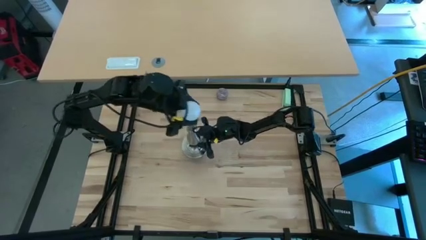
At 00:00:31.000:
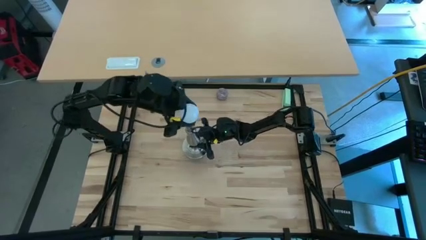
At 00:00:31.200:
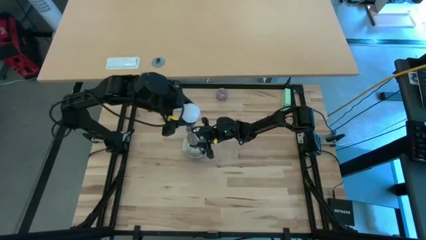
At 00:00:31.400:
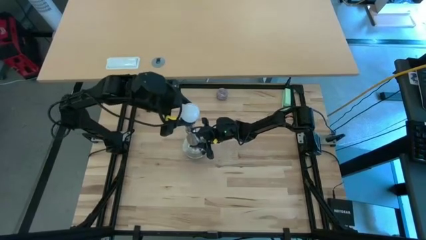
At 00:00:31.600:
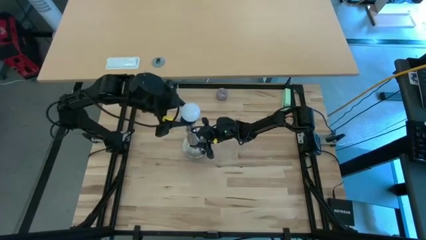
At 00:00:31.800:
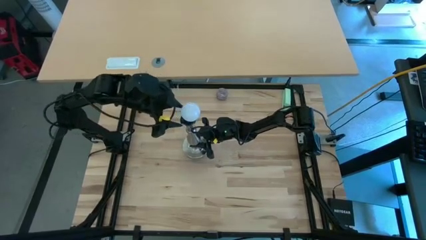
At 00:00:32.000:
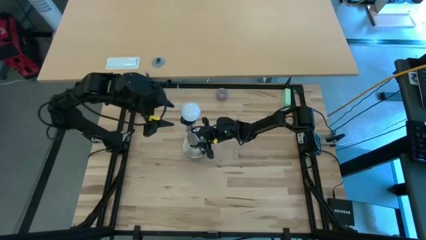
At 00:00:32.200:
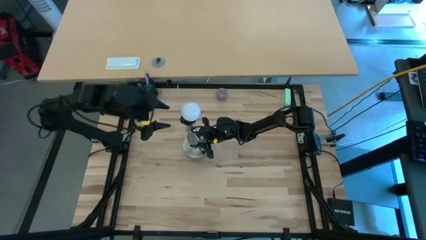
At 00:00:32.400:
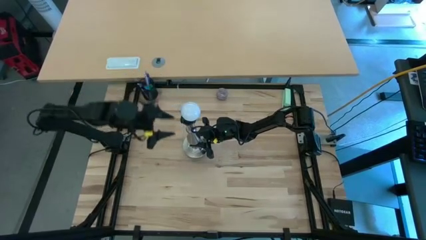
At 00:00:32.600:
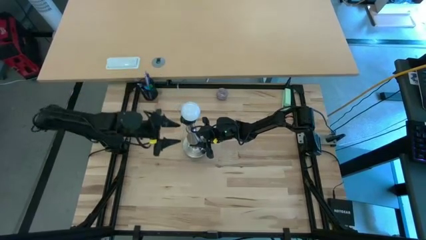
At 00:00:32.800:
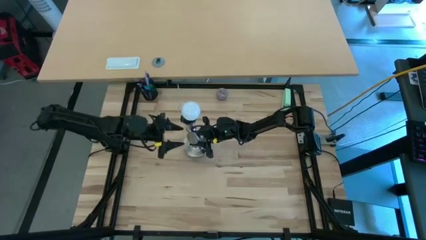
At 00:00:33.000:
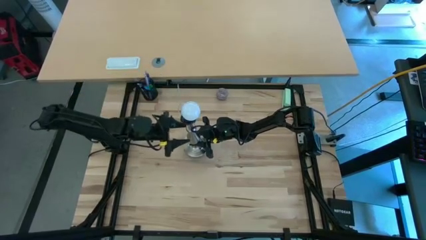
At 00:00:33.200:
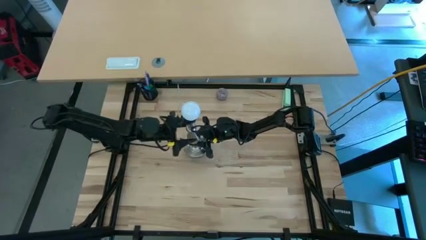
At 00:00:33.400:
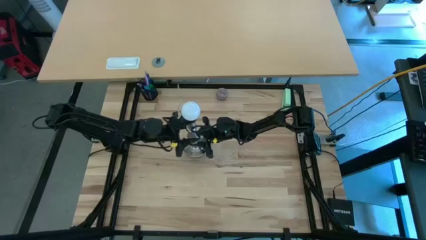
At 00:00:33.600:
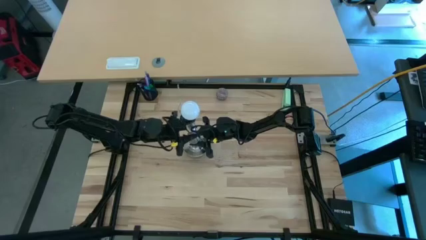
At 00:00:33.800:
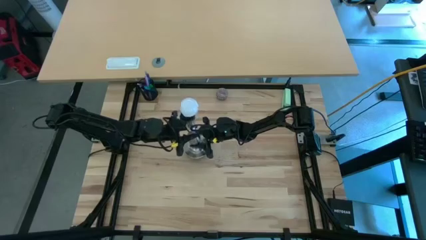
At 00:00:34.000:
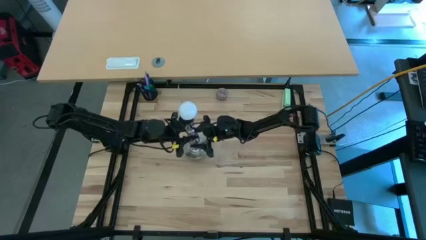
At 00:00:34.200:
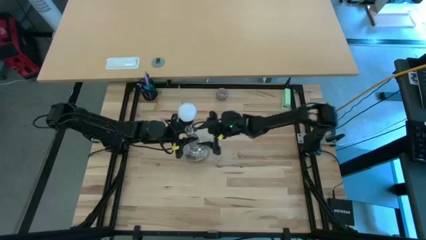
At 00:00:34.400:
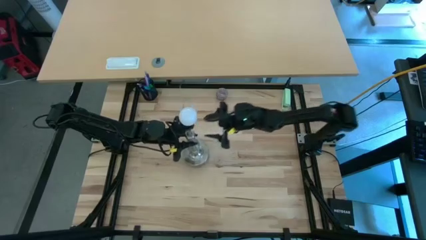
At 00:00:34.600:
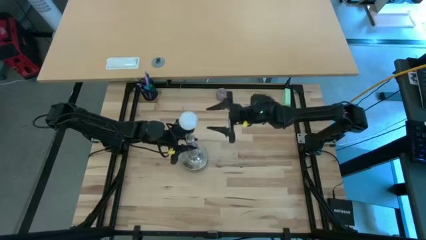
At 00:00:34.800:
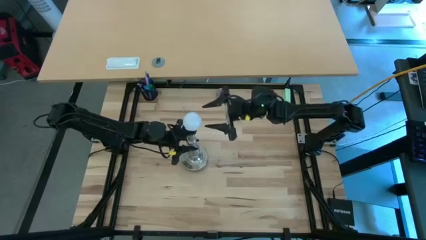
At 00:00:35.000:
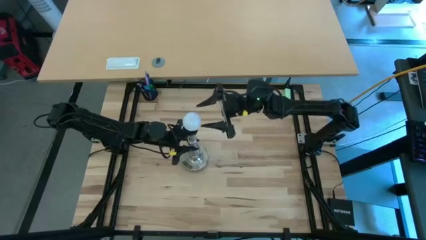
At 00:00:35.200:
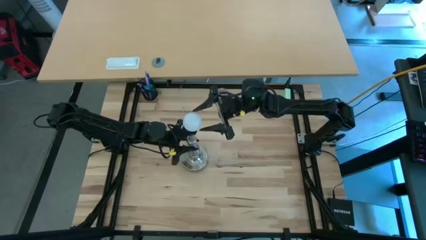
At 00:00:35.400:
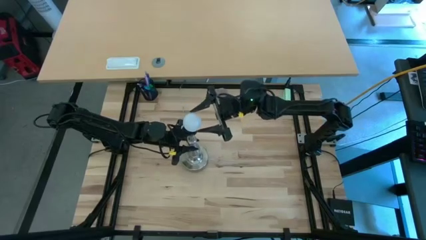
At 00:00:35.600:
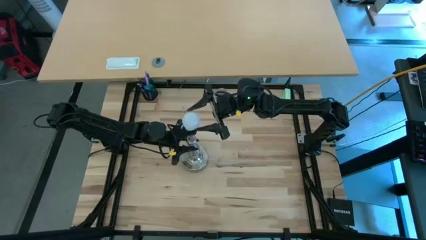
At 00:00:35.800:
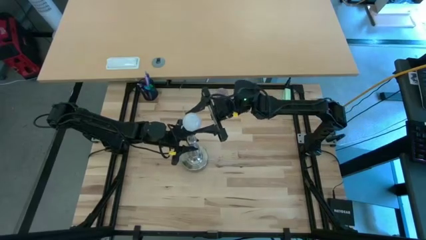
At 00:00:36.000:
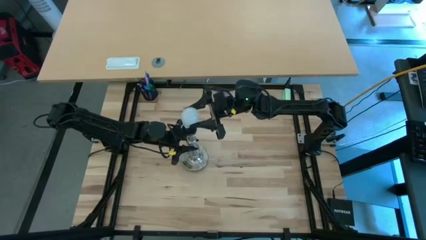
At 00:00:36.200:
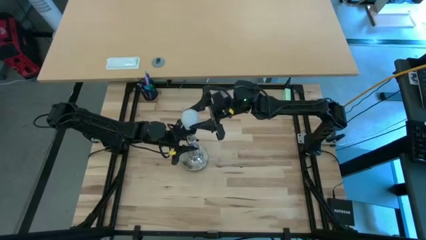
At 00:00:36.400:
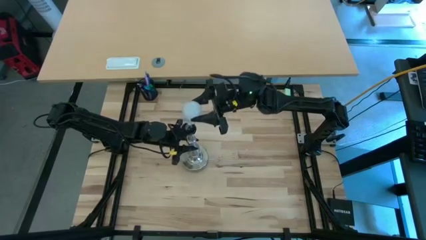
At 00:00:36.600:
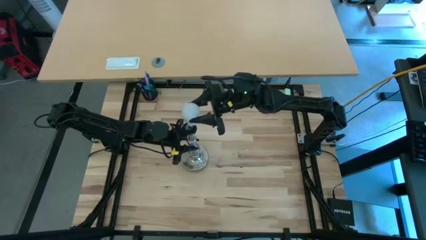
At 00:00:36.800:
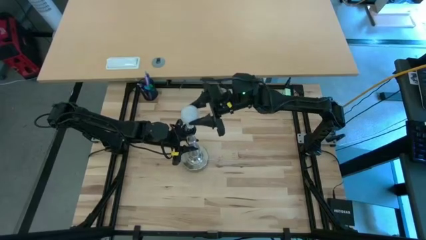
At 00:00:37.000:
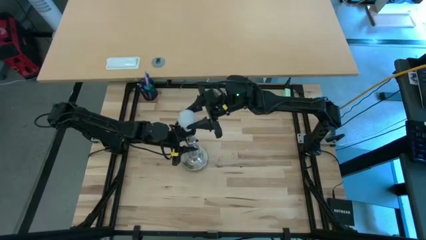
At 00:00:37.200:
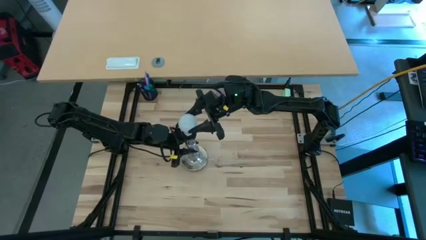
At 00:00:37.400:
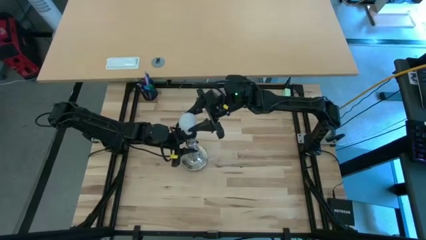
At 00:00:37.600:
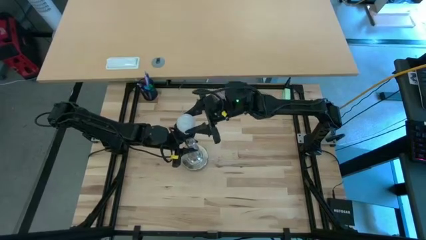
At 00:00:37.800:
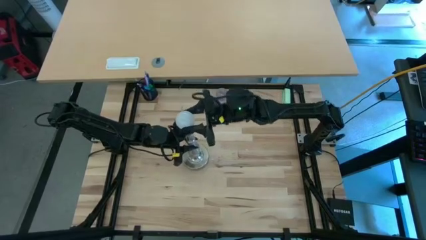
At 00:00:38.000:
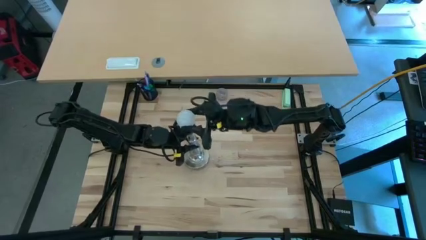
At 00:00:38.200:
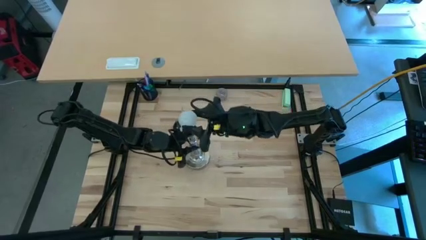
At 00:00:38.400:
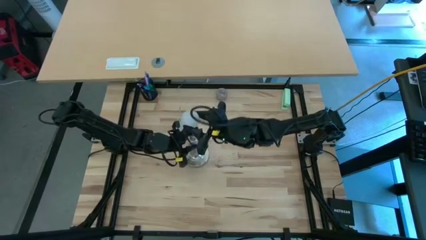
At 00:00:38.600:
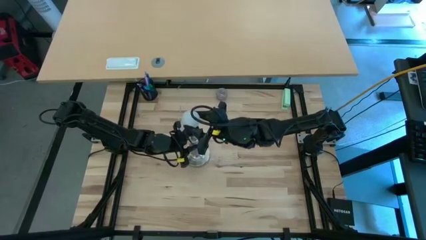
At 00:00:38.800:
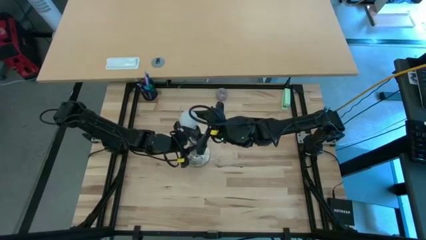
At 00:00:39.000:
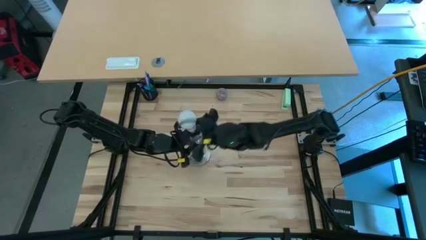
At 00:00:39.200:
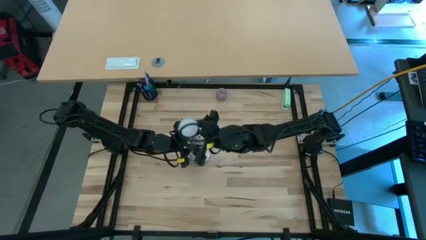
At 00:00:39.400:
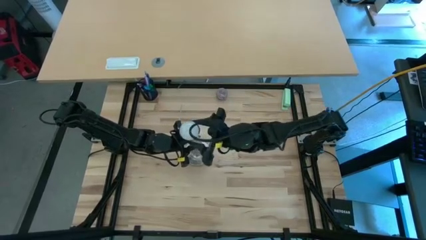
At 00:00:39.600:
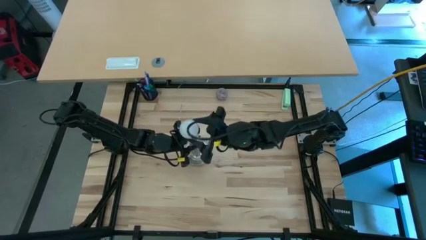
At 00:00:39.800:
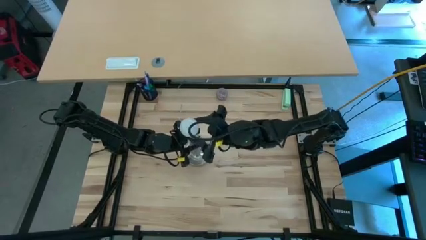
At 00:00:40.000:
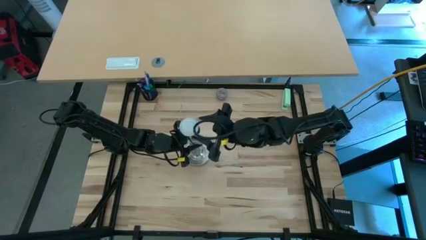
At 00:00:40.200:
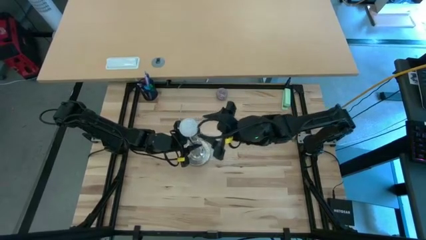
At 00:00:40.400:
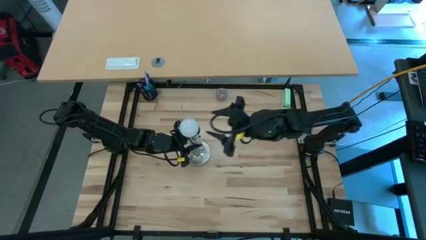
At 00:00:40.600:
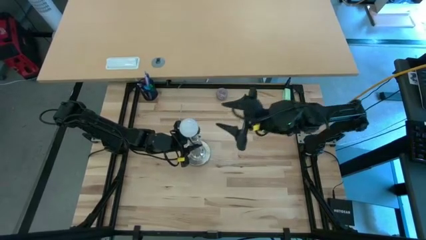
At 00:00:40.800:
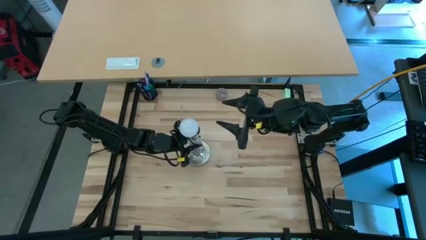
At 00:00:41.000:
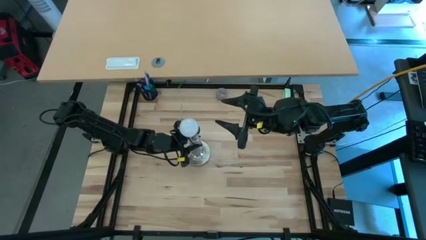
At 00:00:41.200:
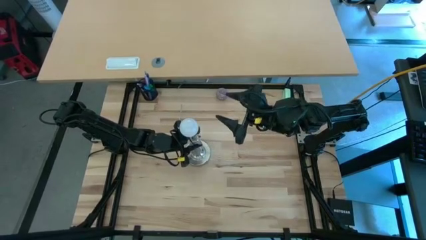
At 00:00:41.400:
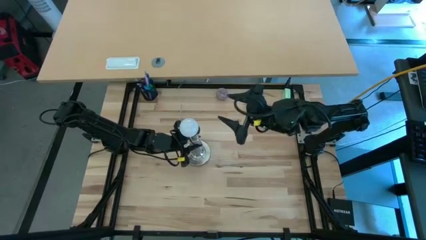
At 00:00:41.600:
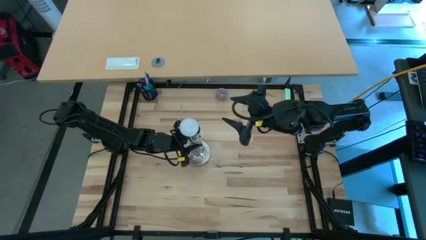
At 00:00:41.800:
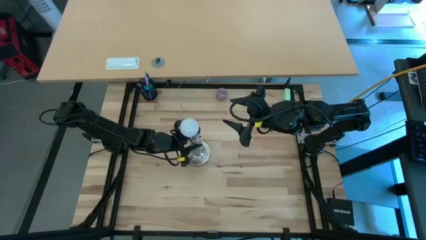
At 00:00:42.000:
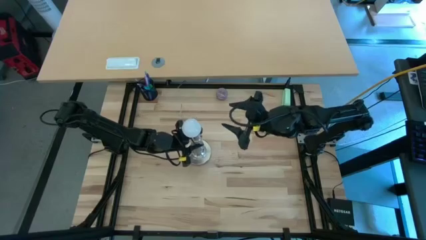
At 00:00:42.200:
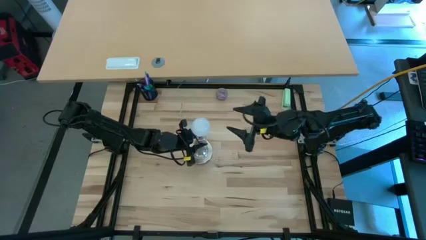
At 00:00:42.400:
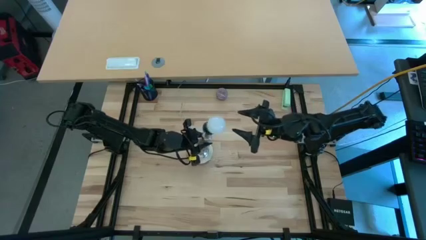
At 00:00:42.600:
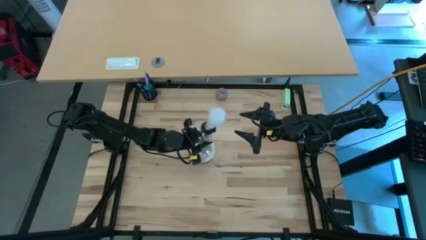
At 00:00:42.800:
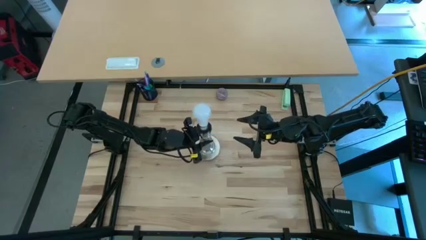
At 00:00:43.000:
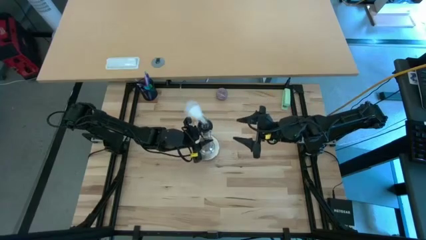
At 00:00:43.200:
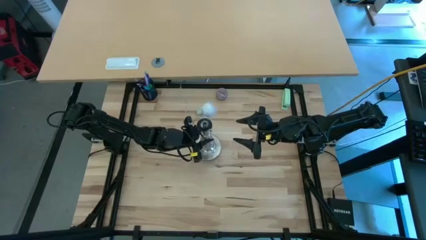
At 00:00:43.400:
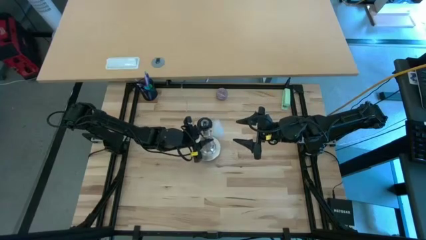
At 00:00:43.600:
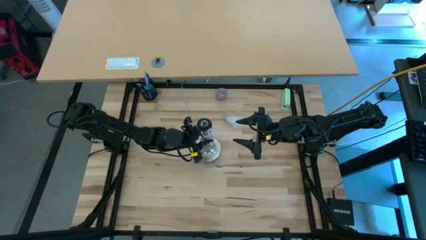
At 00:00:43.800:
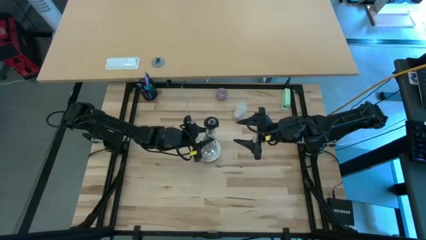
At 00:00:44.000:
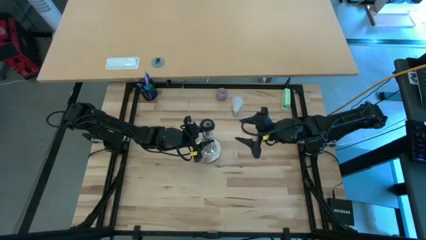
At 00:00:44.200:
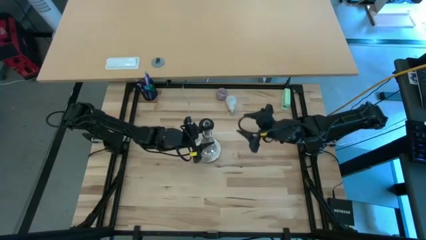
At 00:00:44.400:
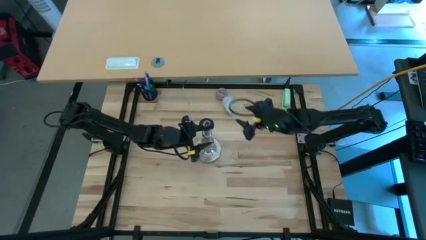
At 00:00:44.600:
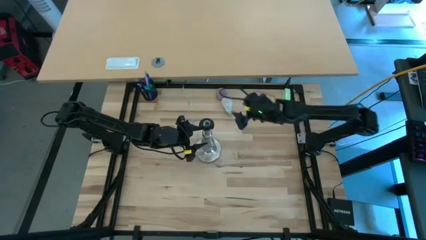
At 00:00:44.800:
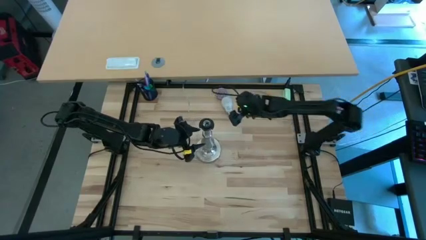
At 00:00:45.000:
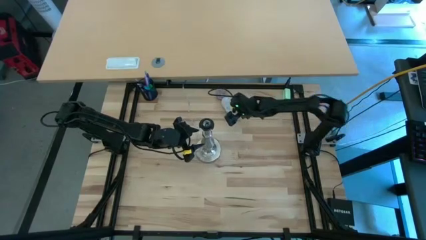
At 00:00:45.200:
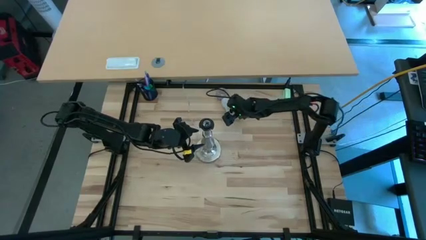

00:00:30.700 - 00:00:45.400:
Task: Screw lightbulb
Insert the lightbulb into the silver lamp
